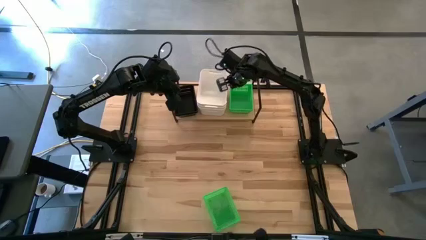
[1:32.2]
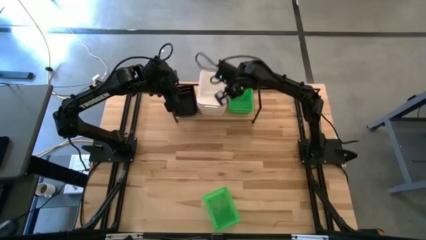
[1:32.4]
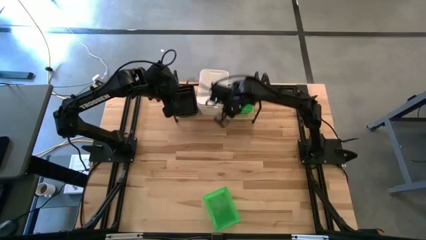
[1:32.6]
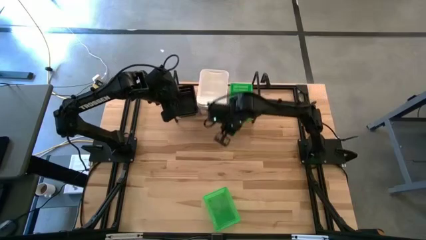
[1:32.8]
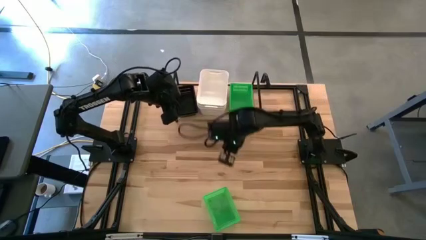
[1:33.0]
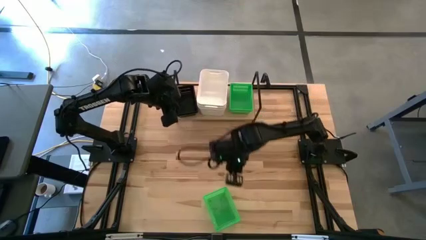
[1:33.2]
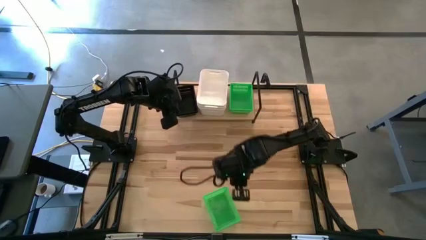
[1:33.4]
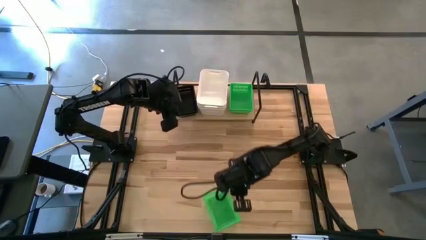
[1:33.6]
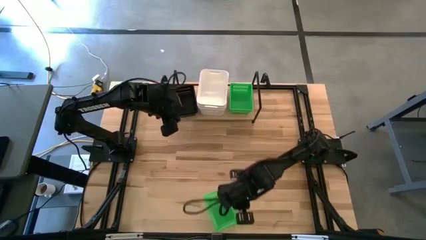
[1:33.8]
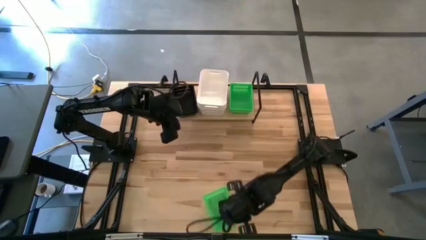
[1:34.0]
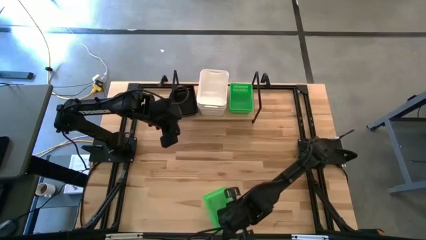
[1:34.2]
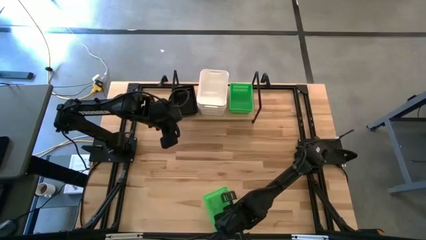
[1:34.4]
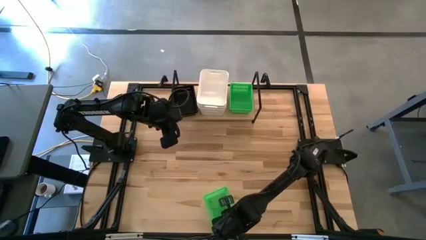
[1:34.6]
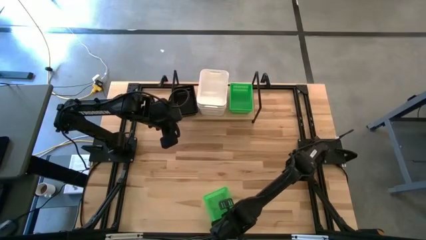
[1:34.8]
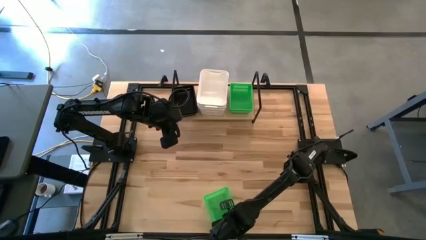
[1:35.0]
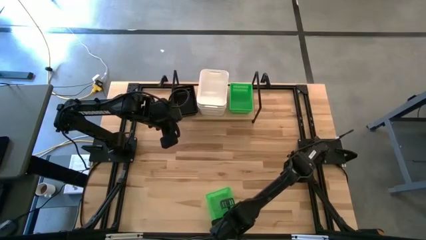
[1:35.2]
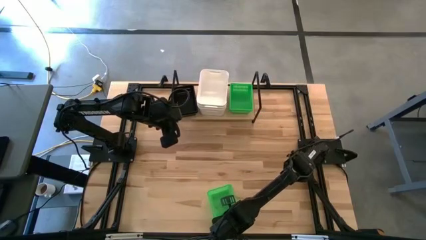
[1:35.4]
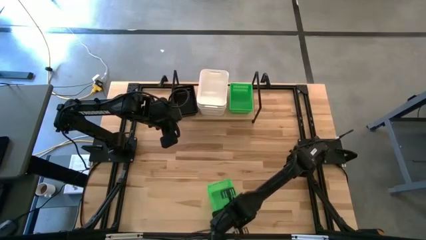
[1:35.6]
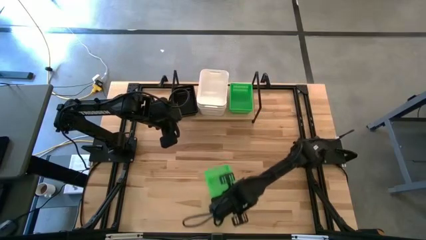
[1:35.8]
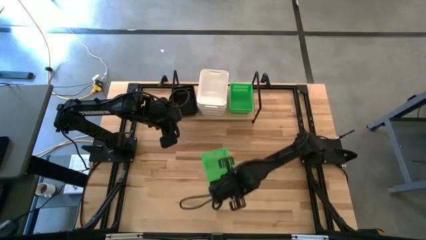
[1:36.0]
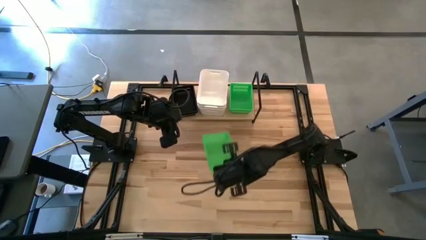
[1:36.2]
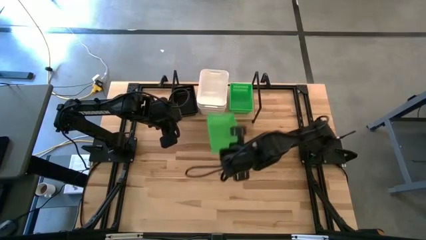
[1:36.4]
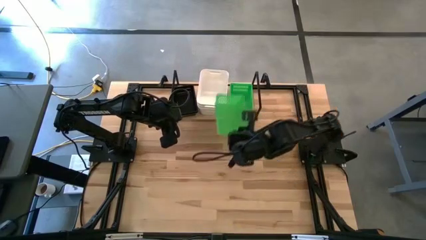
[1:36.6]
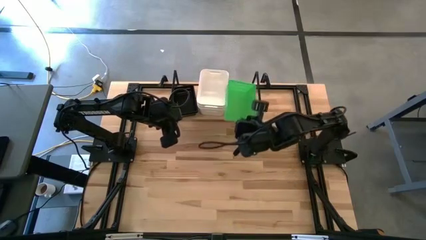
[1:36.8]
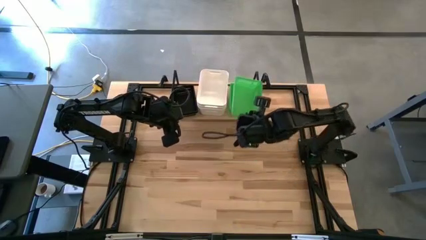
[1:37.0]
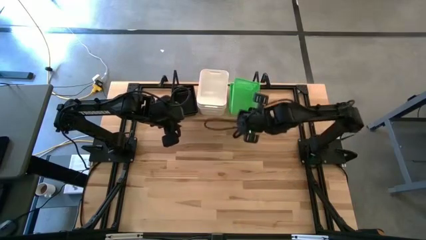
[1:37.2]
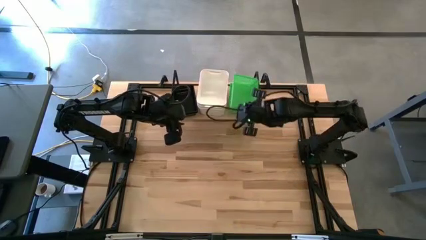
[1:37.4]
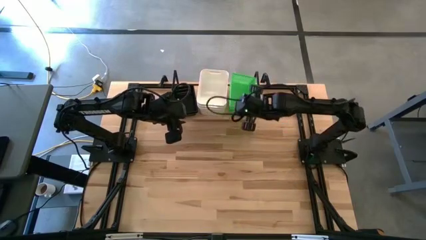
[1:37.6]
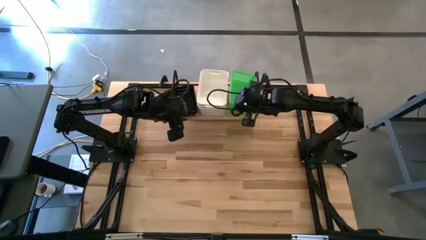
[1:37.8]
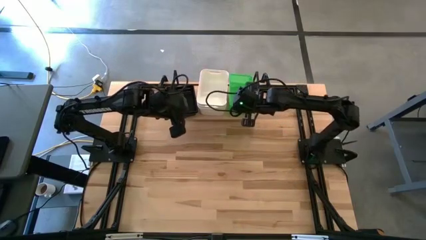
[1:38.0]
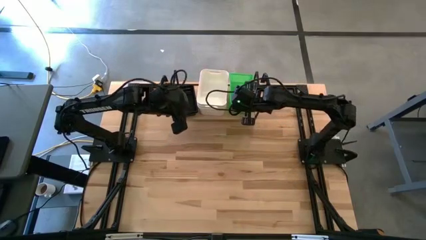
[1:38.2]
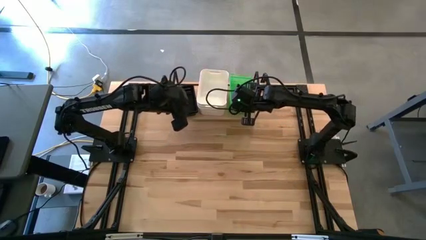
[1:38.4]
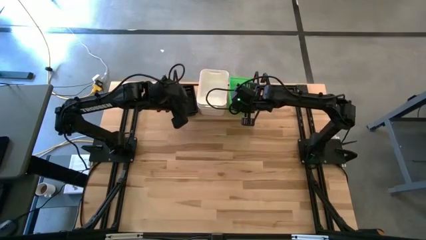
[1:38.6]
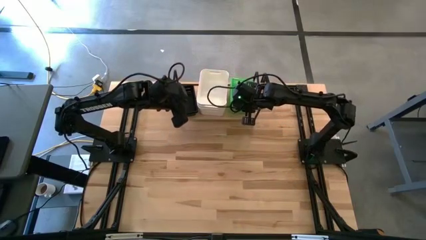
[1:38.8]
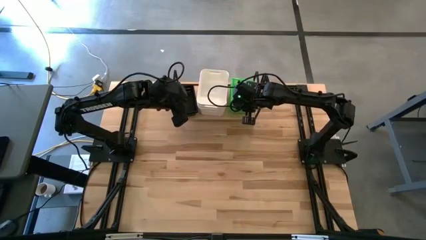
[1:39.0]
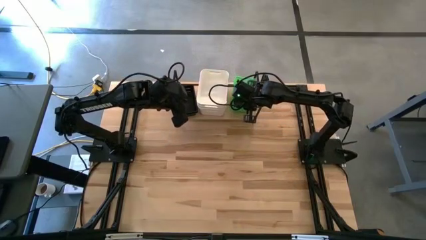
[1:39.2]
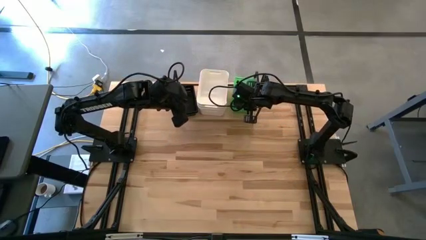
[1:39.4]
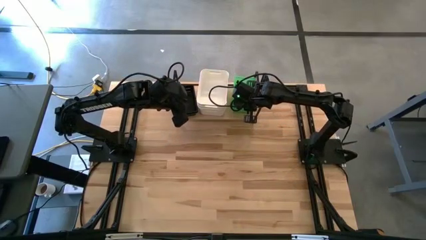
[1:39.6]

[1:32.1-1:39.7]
Task: Stack baskets on shelf by color
Stack the green bin on top of the green bin on the shelf

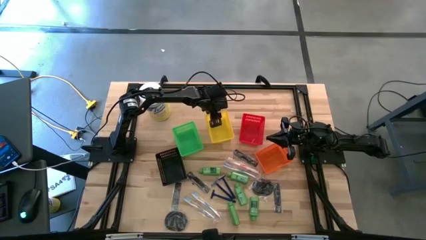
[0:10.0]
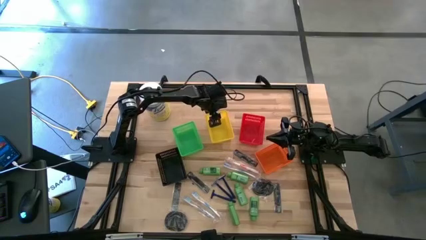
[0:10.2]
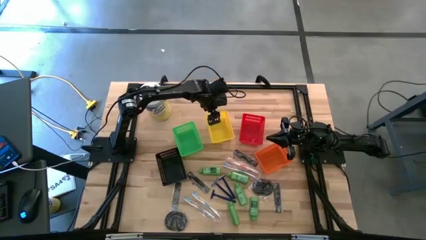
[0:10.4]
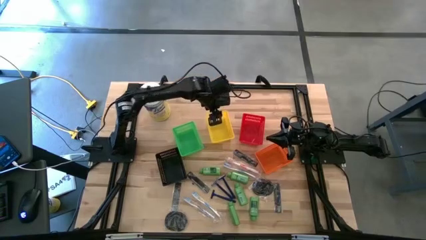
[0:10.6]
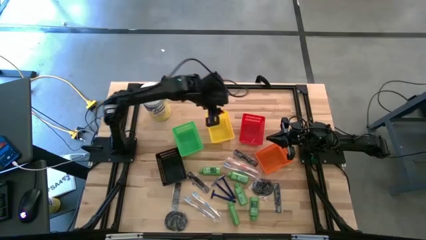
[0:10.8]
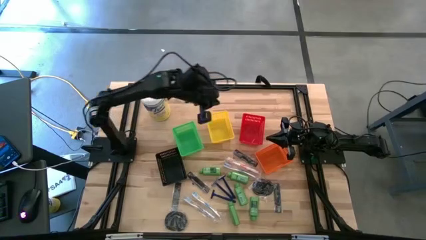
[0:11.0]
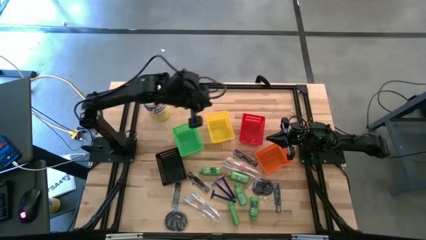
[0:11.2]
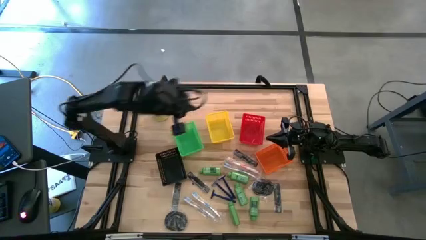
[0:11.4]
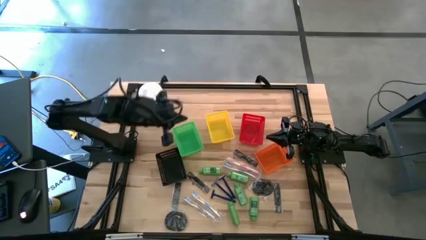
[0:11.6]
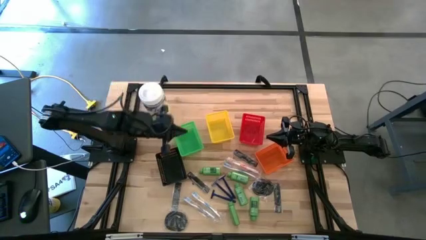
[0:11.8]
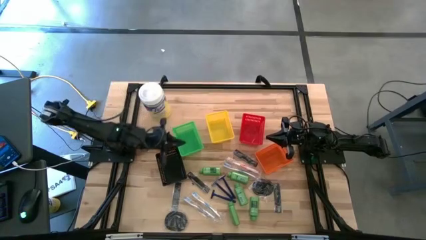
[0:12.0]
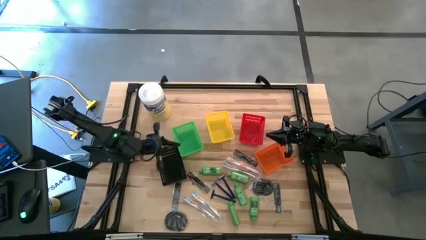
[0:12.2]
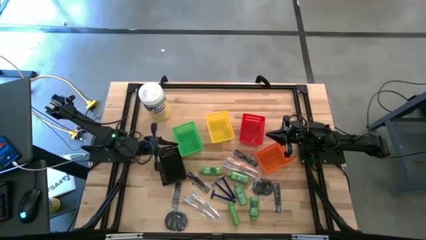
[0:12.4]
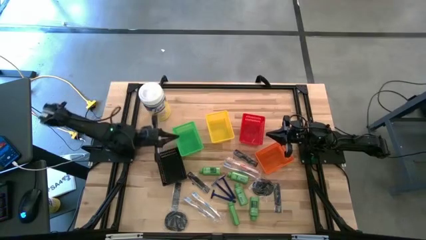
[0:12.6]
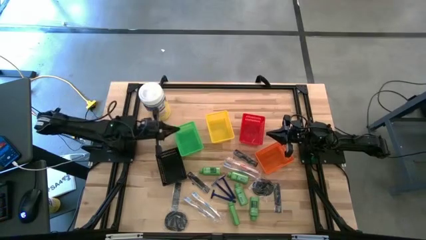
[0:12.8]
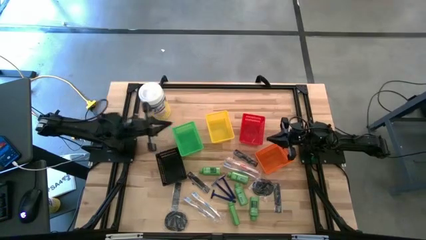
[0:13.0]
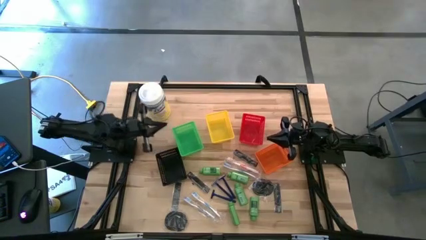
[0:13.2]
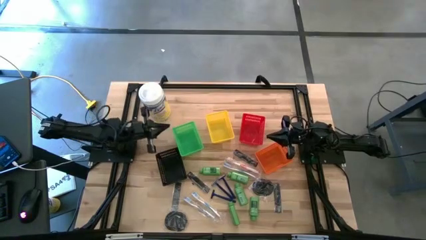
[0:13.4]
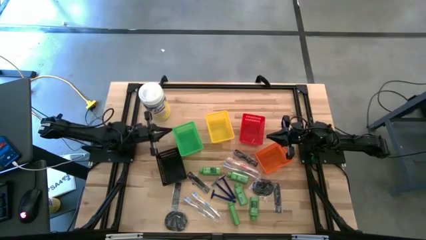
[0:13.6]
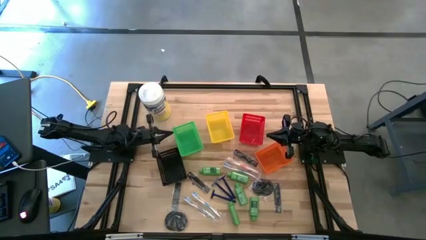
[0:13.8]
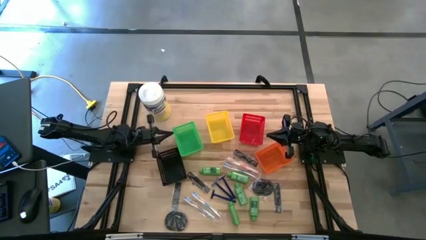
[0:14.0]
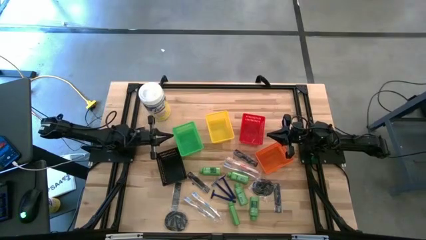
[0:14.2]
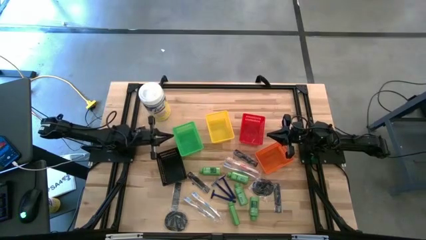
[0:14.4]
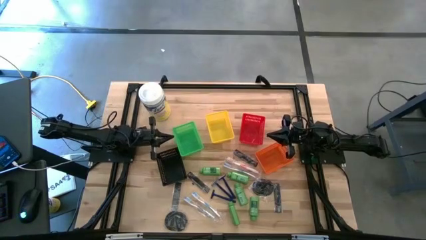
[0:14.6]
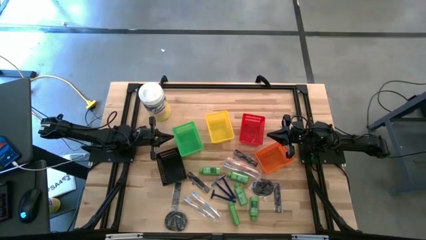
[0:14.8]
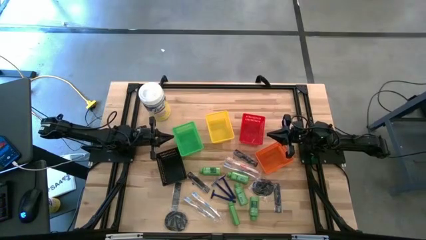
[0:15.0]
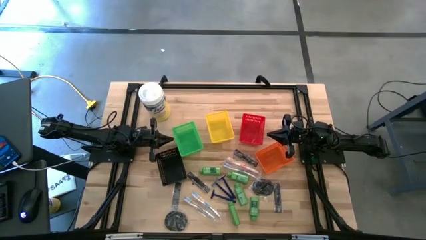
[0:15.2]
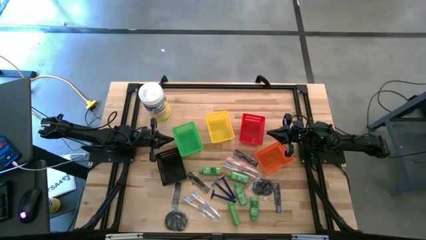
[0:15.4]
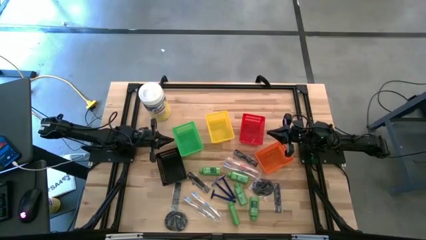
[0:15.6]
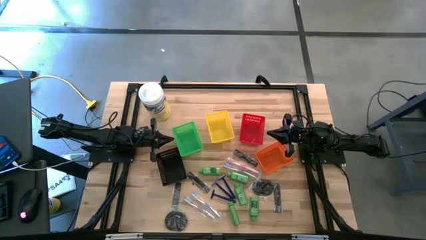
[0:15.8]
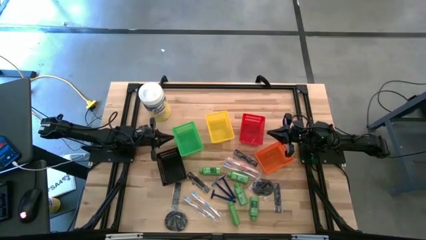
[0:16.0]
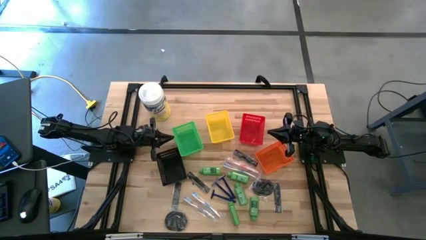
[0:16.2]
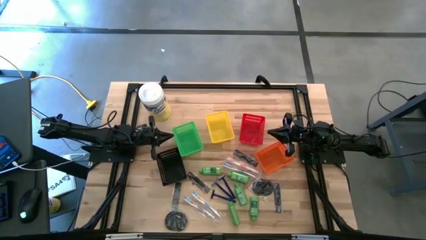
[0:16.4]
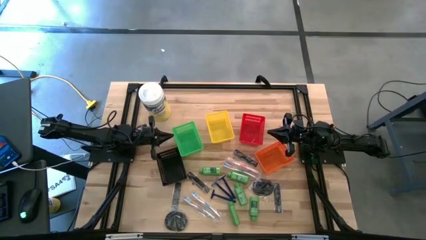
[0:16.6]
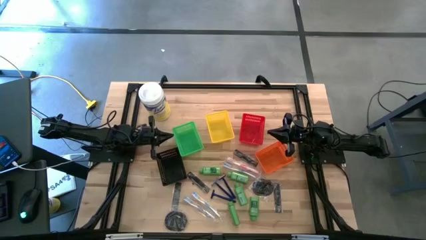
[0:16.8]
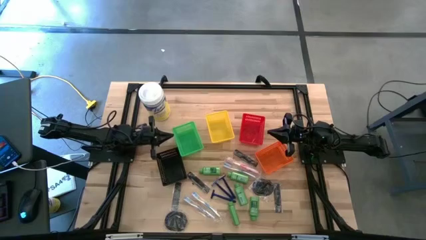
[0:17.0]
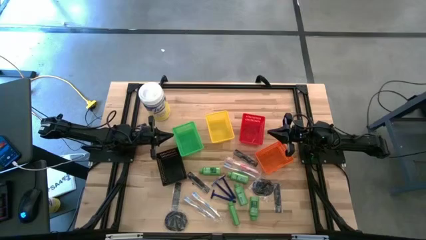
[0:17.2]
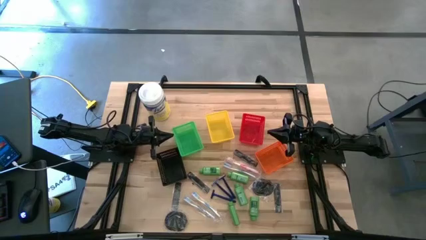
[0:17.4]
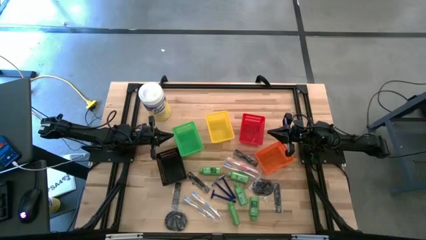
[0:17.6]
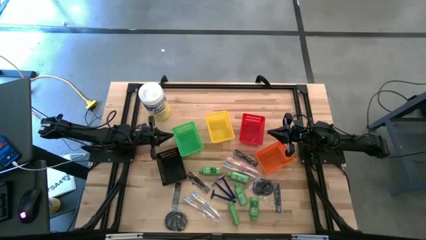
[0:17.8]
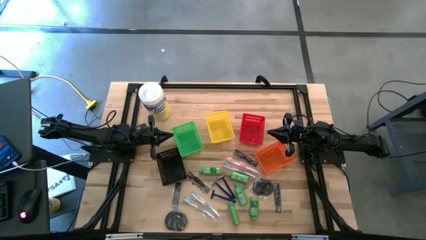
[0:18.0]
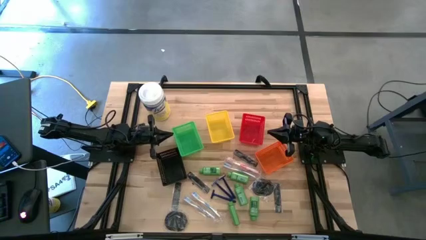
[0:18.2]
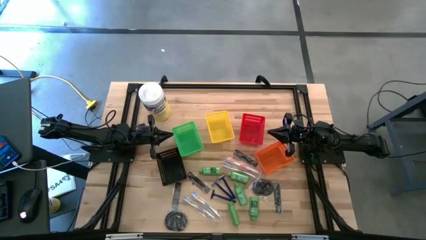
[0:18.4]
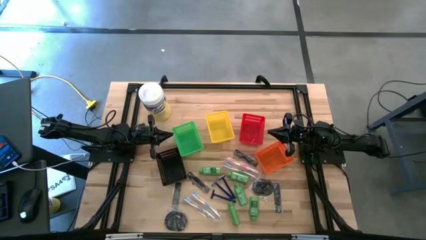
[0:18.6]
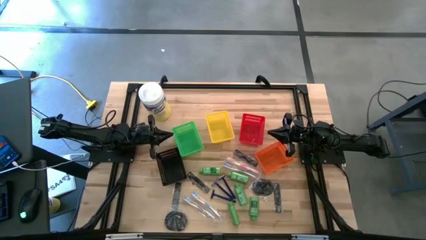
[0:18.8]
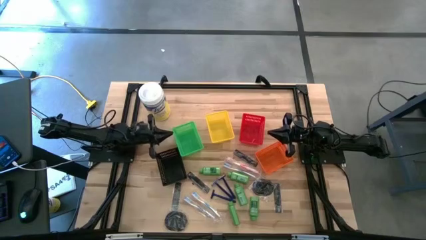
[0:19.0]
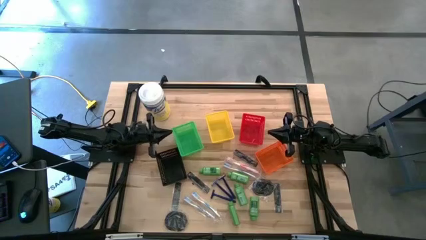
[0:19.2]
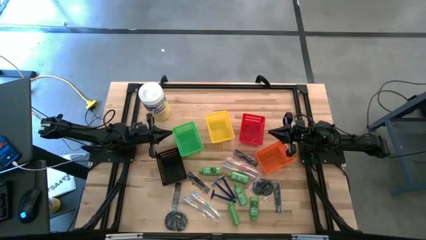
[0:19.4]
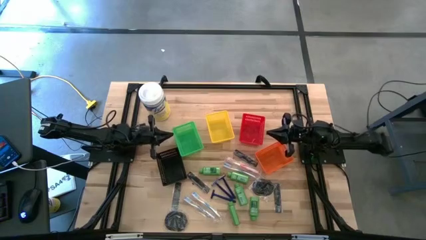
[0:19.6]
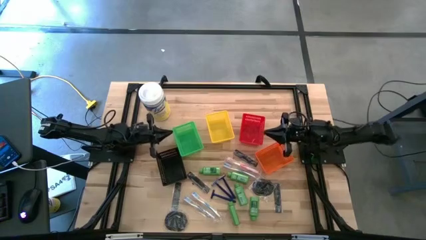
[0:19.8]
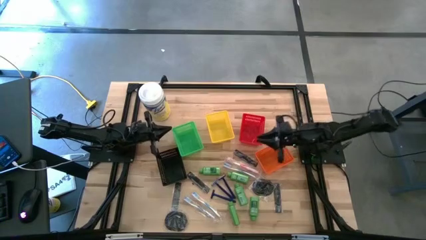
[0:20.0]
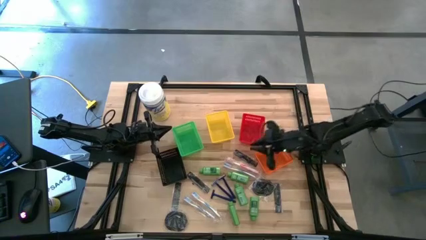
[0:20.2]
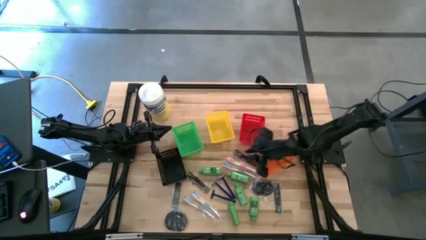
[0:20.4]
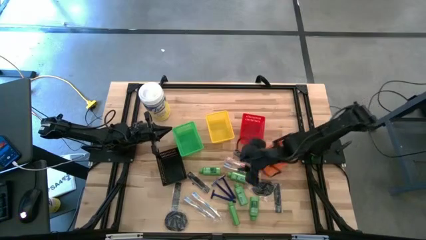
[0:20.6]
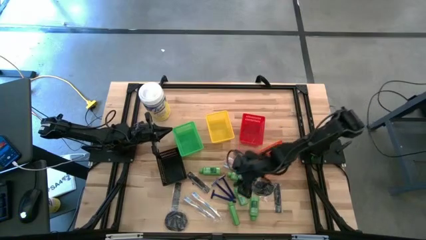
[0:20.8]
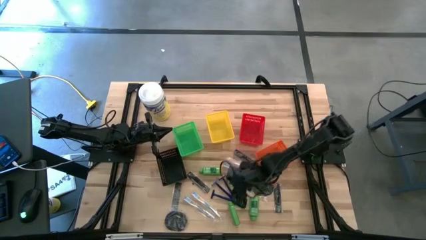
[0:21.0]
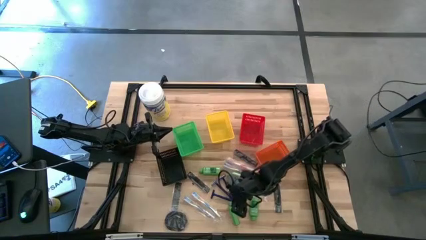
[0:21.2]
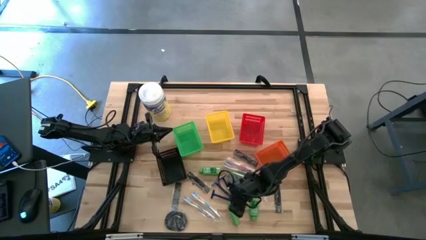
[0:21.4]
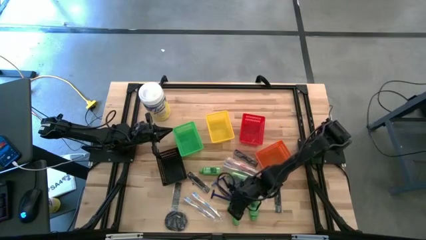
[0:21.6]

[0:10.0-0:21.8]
Task: Pick & Place Travel size toiletries
Put the green shampoo into the yellow bin
